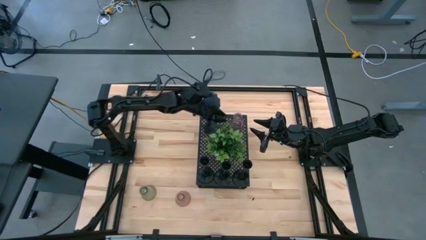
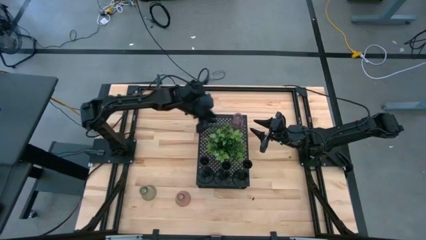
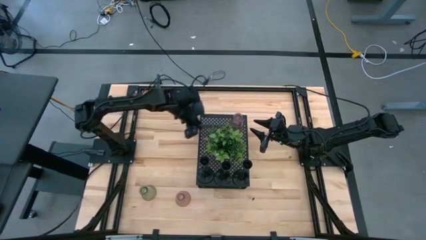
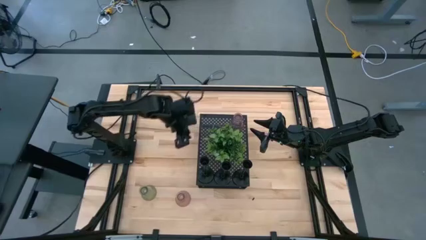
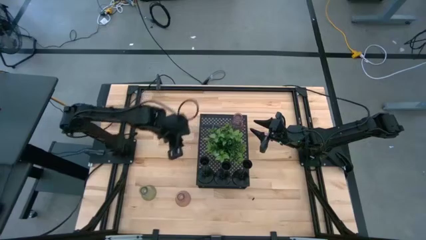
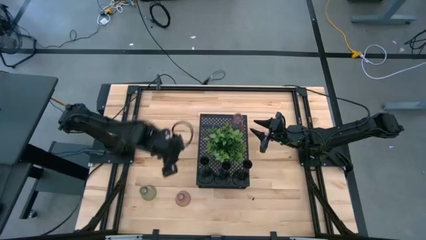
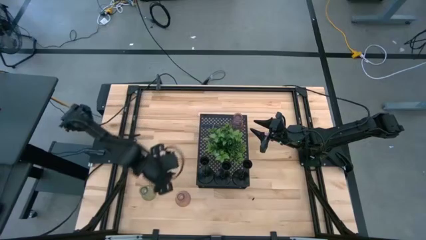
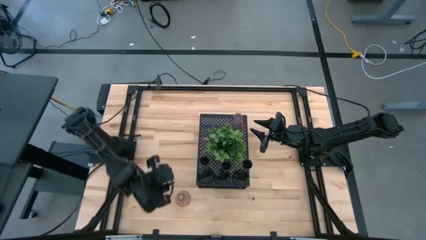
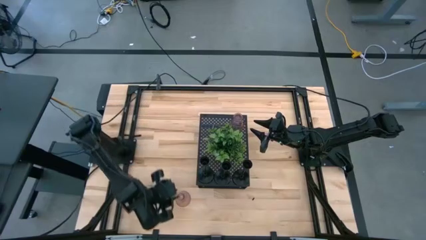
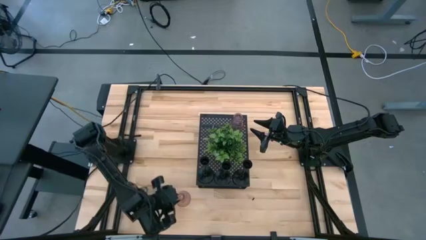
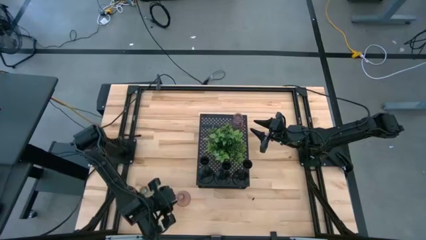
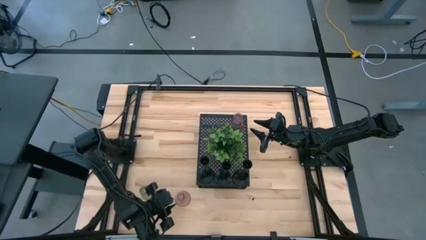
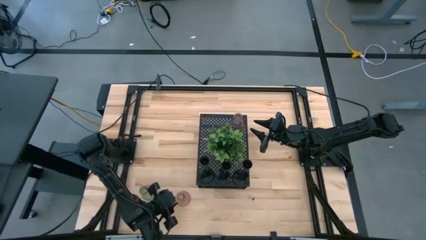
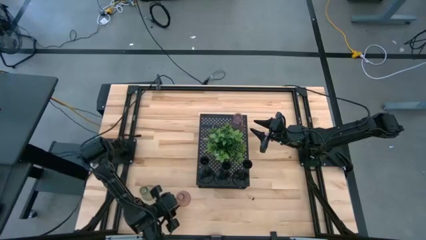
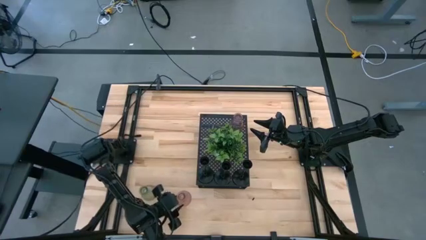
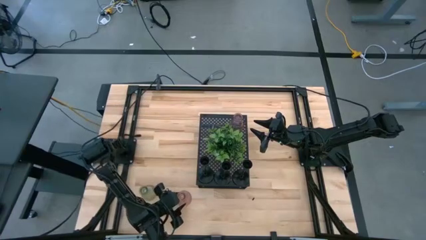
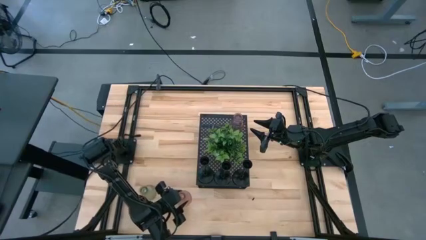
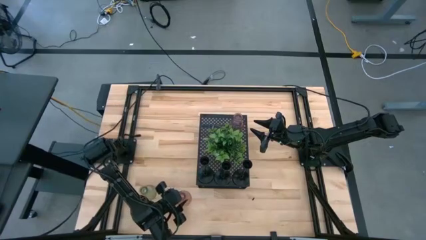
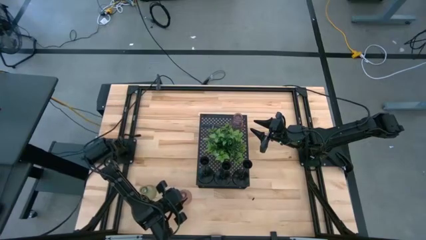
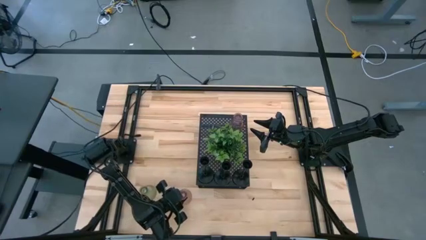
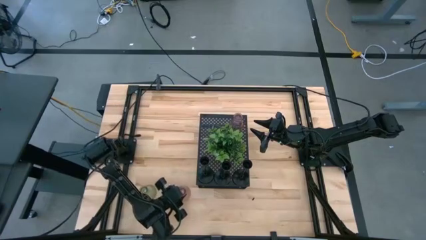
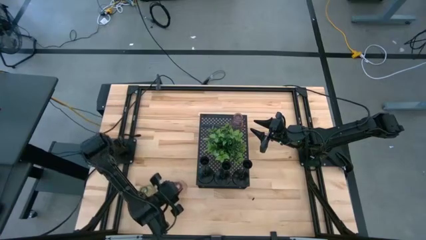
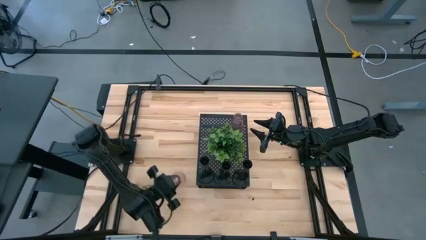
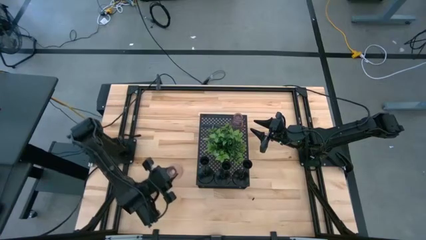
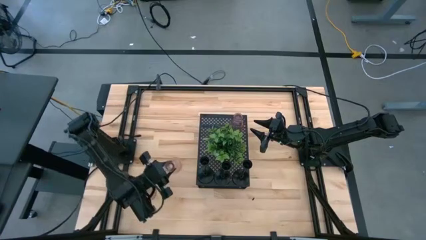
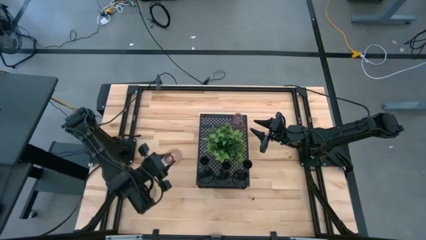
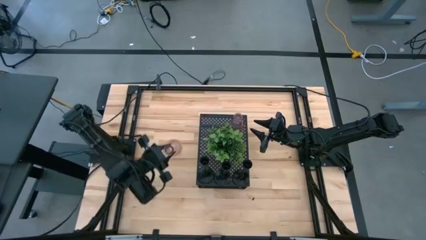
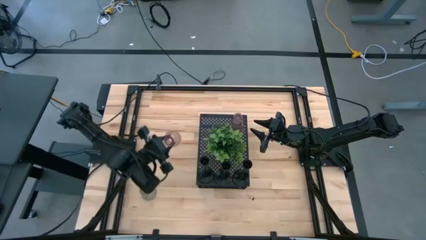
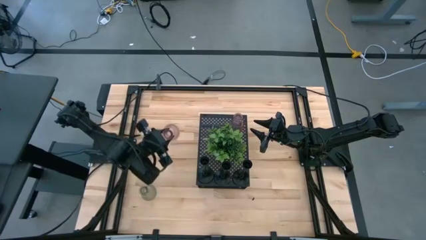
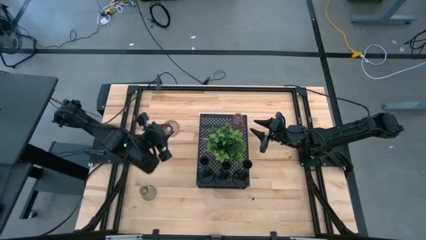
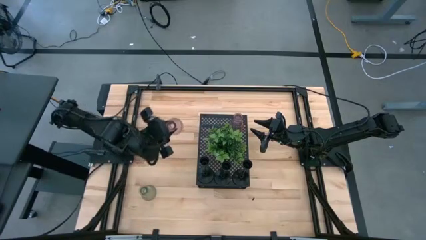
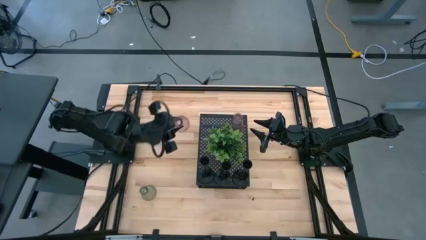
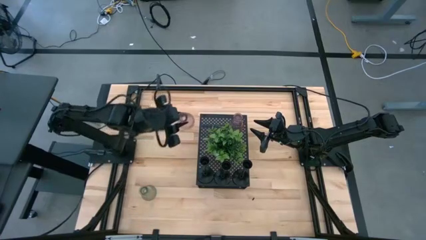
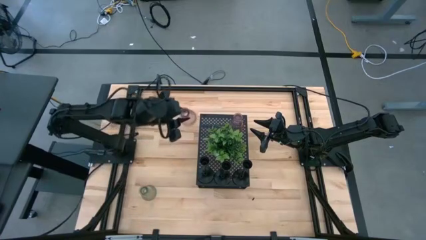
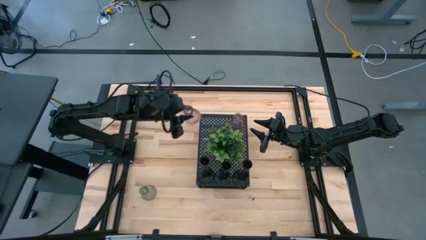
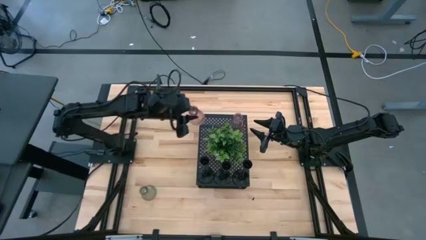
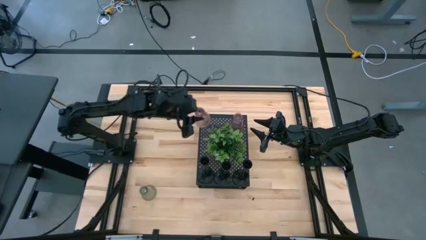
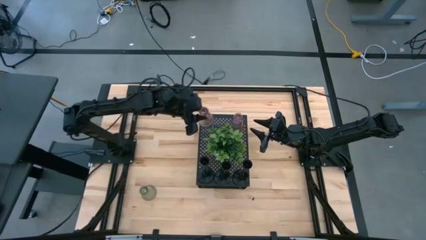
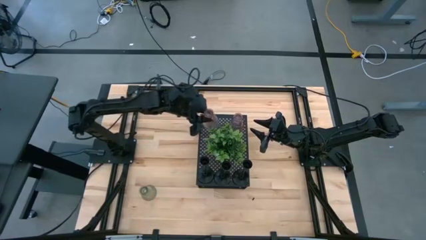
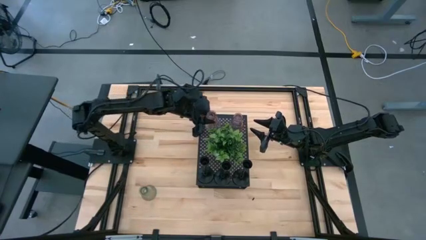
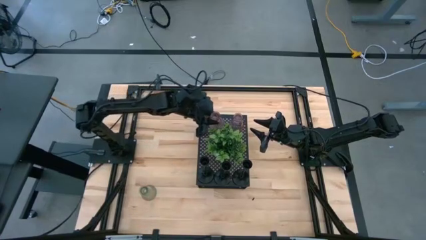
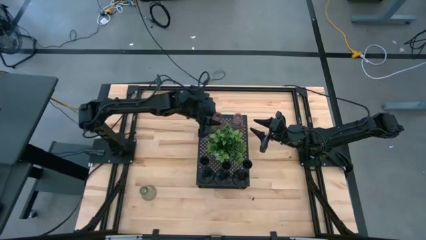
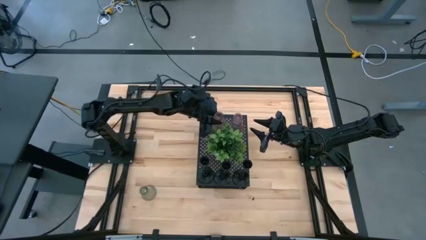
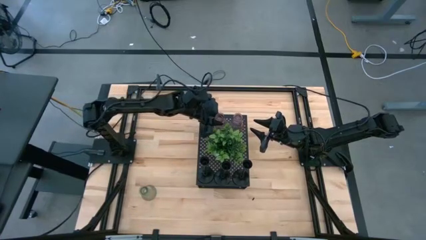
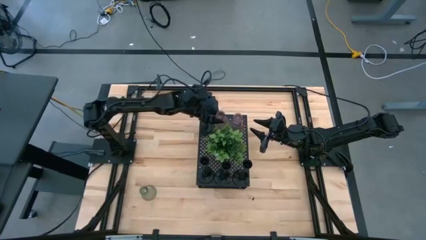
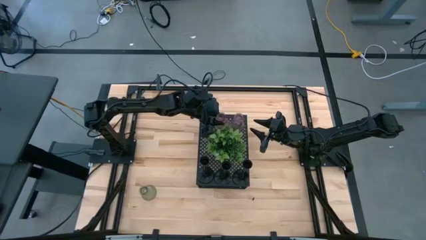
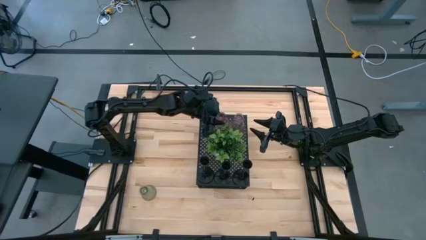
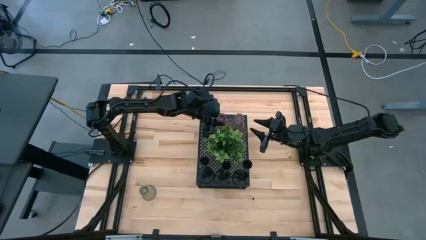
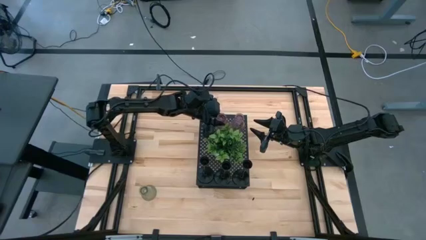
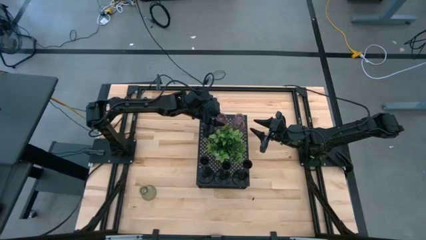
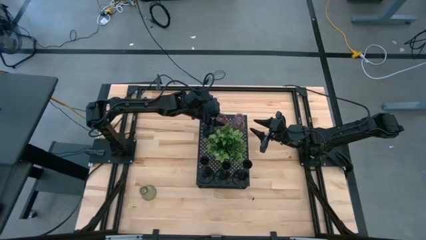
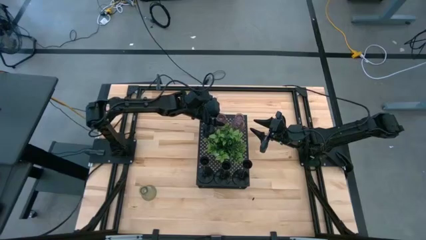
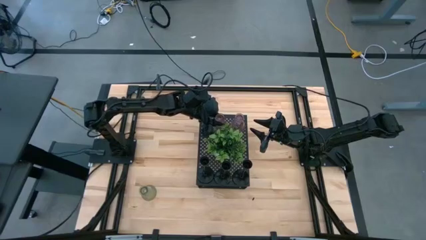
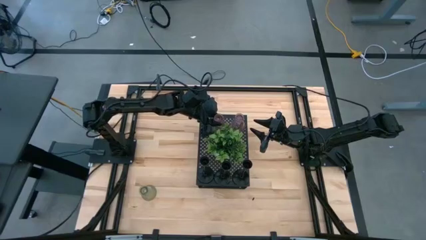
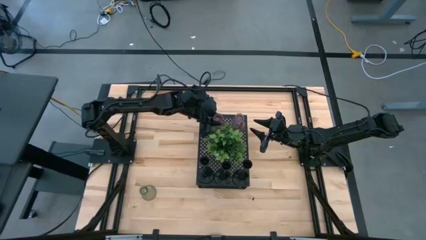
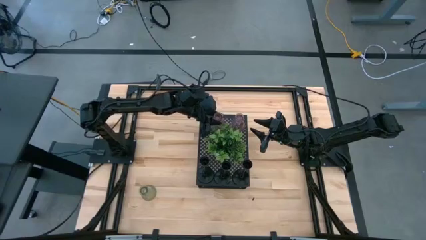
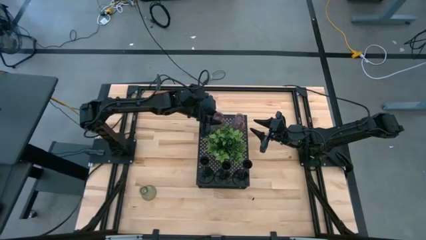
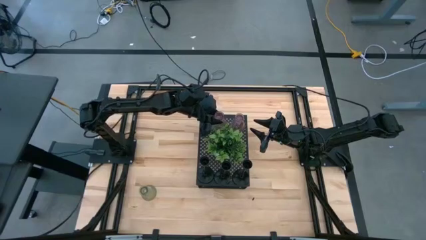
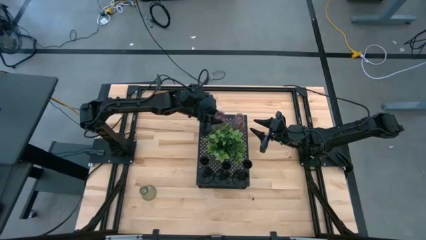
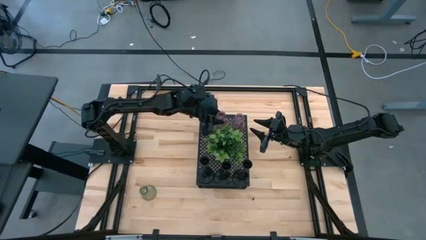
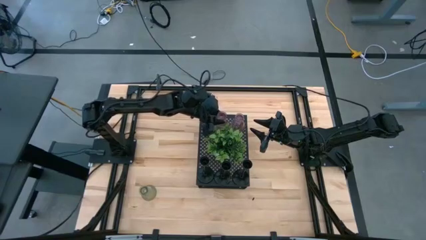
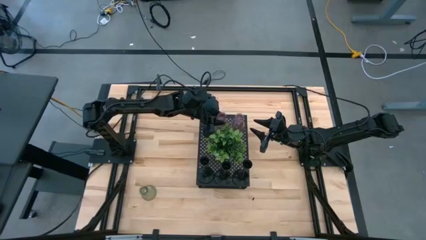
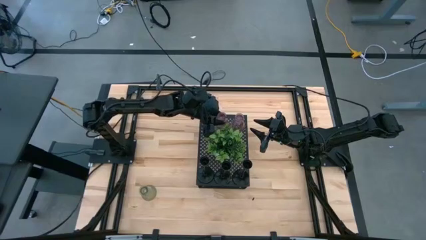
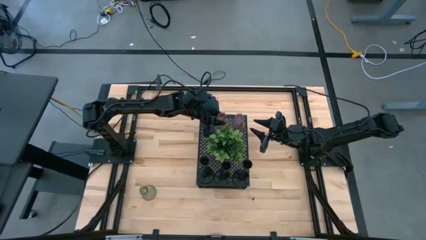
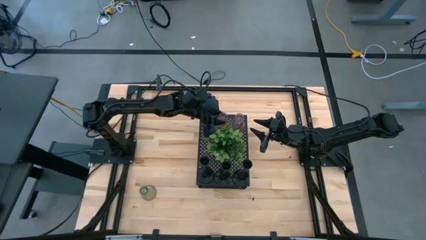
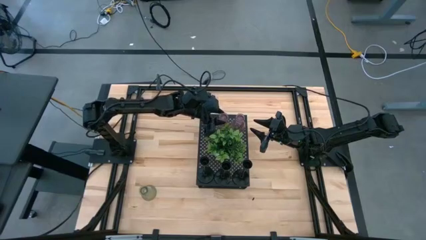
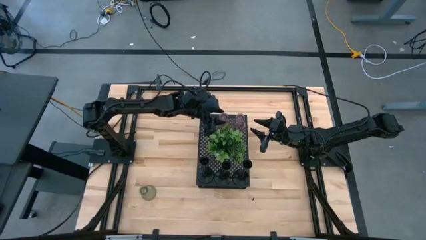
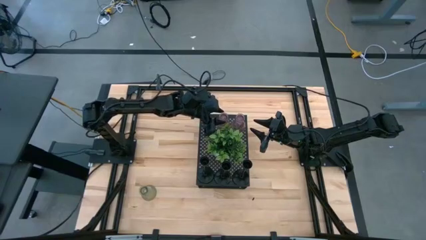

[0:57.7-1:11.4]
Task: Pick & Place candle stick holders
Align the pink glass candle holder with the other glass candle holder on the shelf

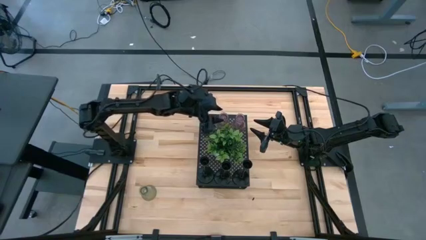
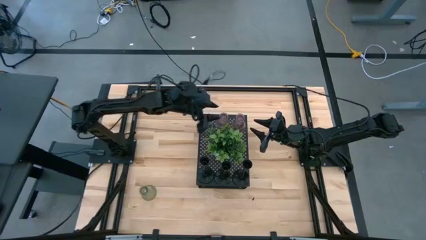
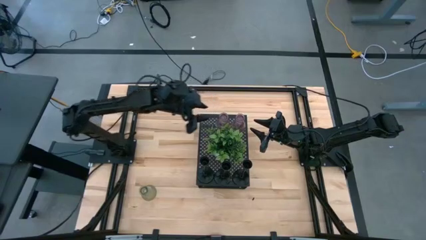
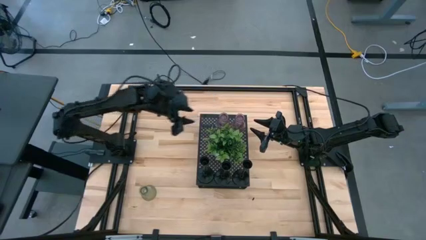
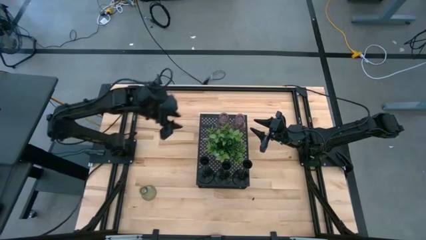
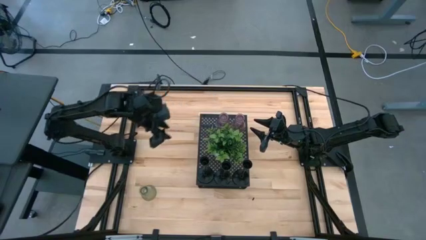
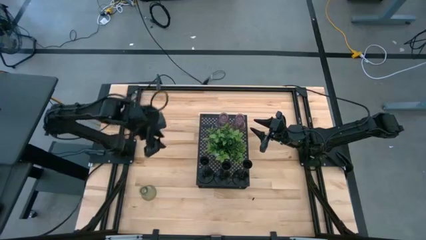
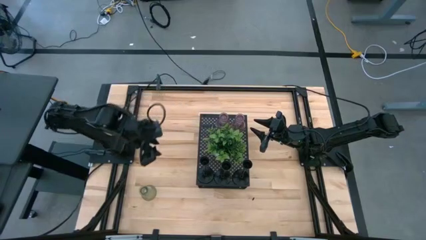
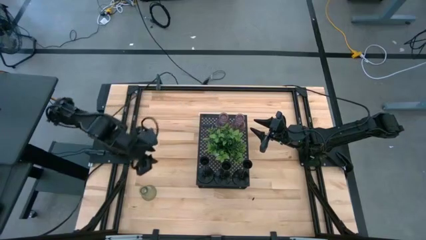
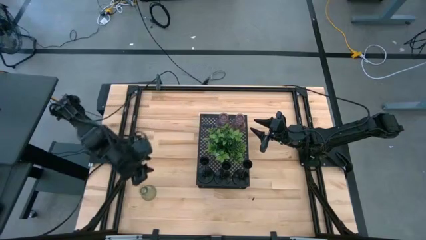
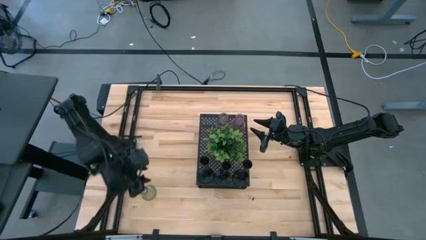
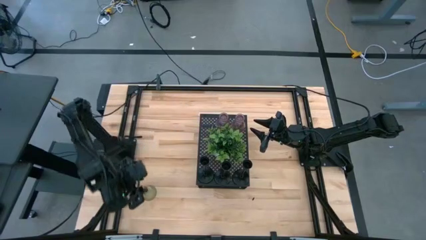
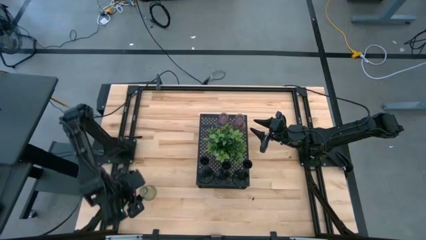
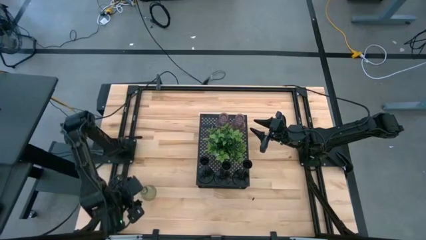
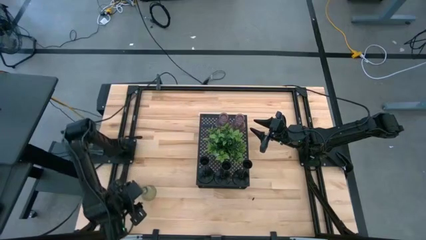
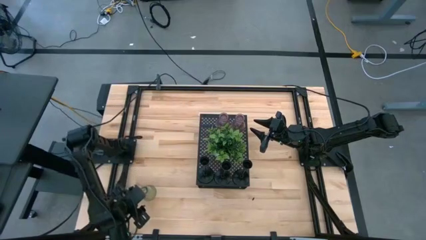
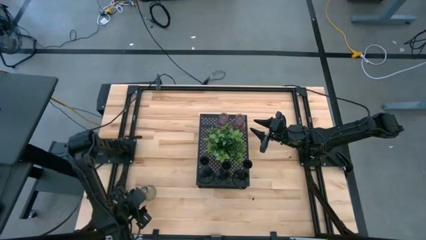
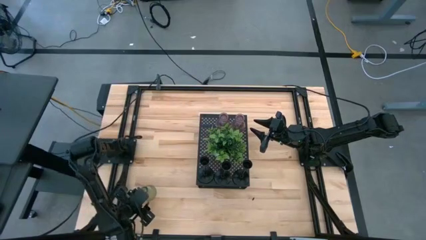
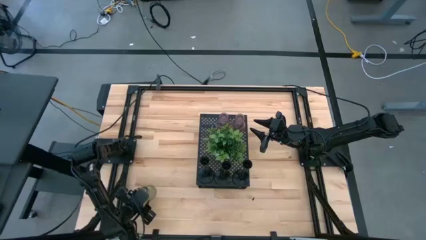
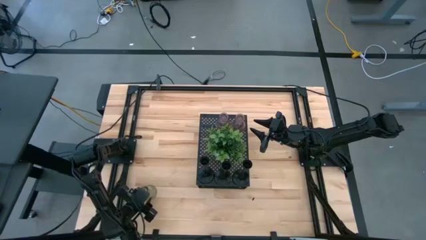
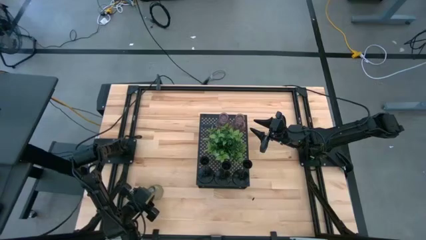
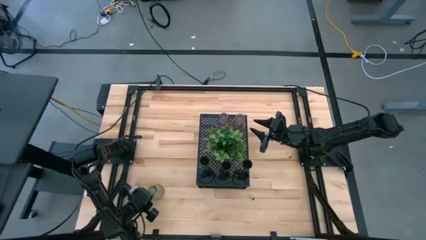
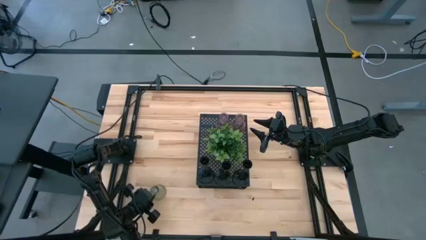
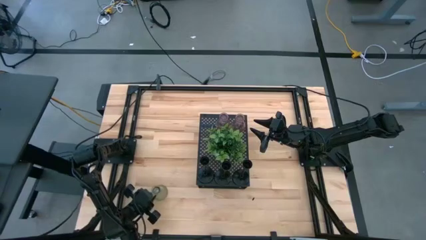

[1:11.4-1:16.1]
Align the green glass candle holder with the other glass candle holders on the shelf
